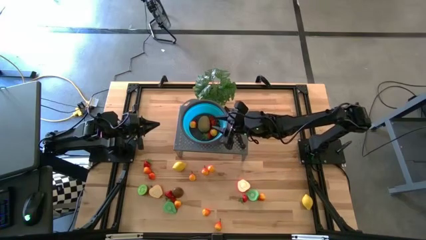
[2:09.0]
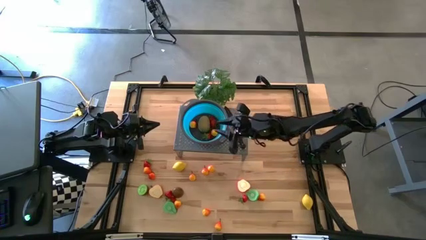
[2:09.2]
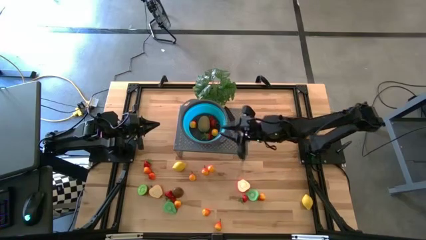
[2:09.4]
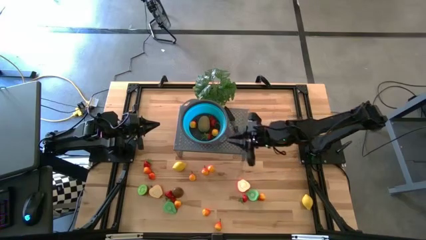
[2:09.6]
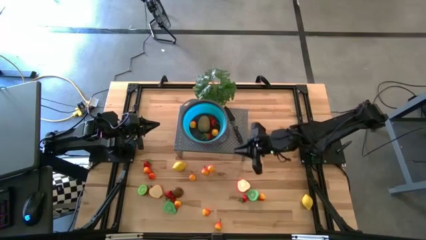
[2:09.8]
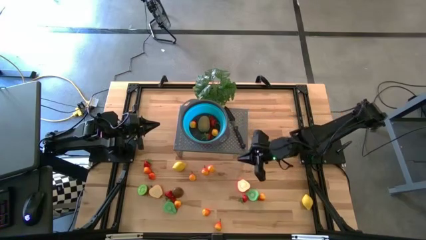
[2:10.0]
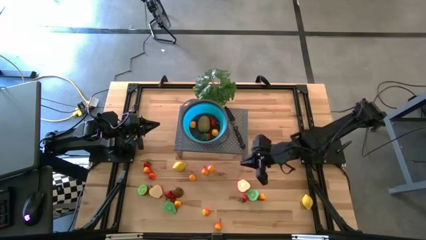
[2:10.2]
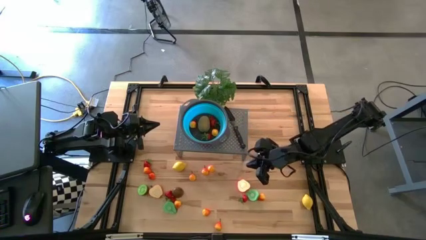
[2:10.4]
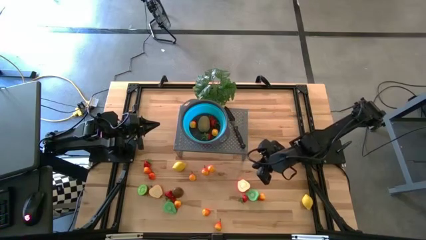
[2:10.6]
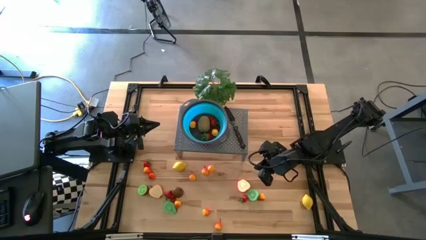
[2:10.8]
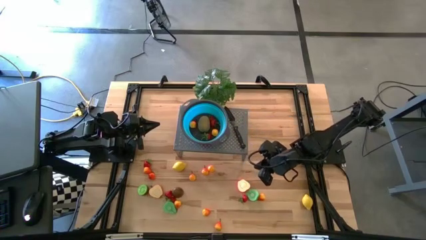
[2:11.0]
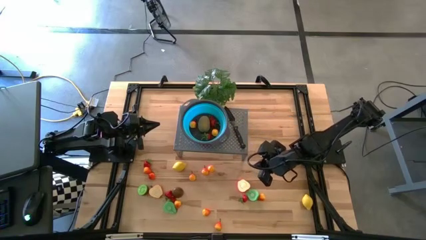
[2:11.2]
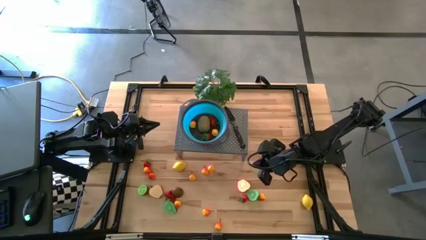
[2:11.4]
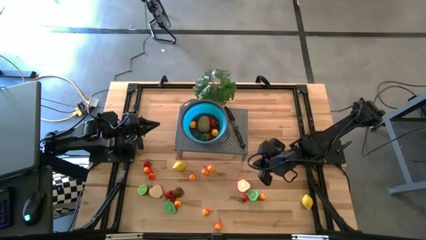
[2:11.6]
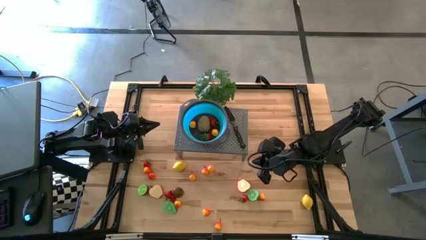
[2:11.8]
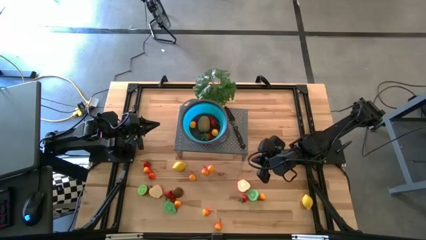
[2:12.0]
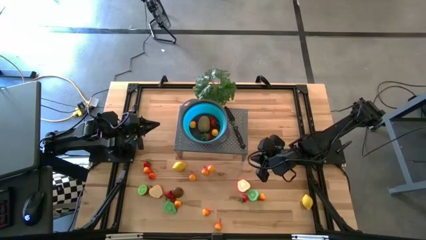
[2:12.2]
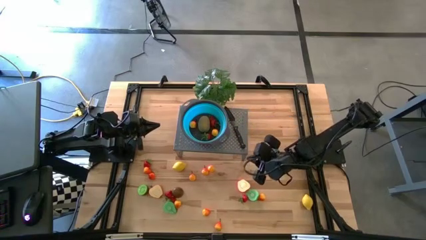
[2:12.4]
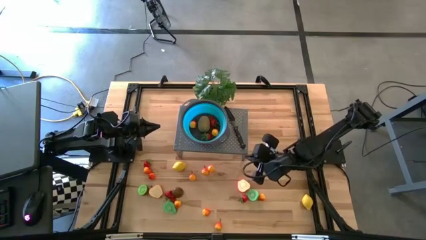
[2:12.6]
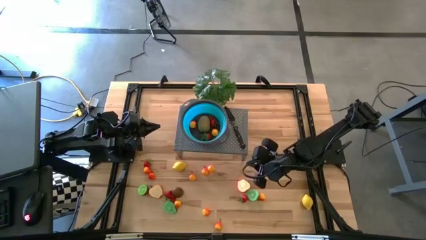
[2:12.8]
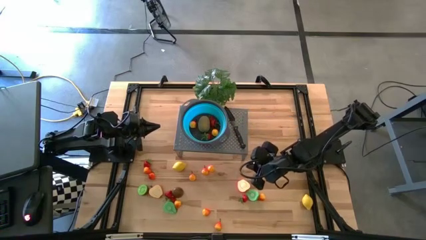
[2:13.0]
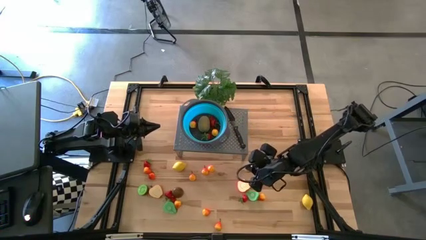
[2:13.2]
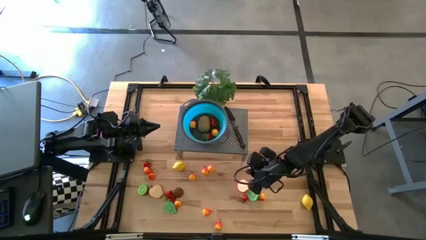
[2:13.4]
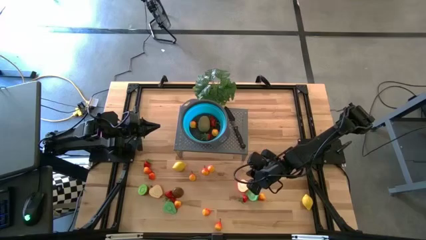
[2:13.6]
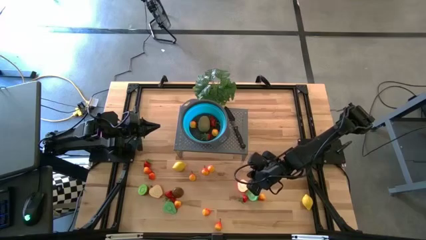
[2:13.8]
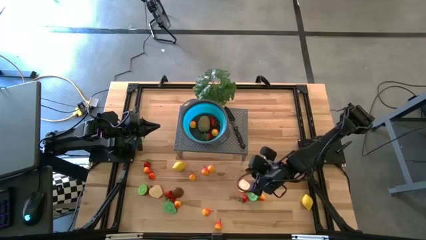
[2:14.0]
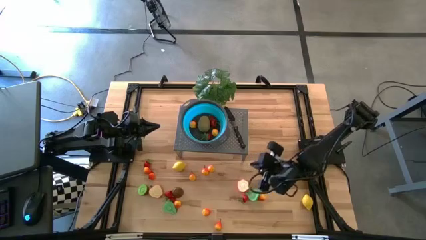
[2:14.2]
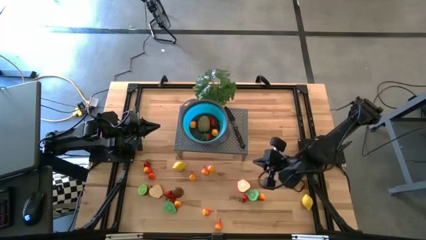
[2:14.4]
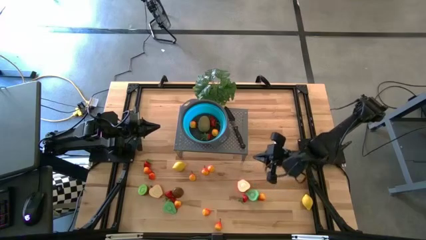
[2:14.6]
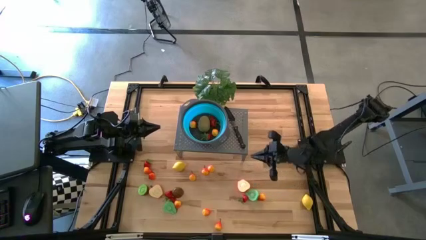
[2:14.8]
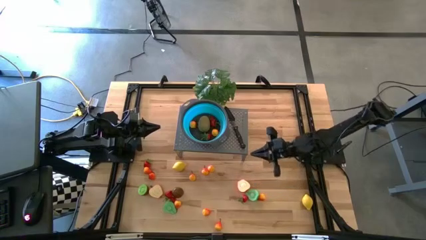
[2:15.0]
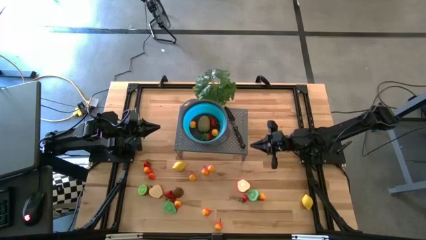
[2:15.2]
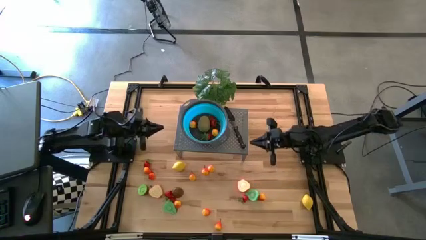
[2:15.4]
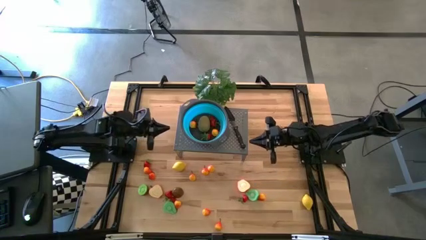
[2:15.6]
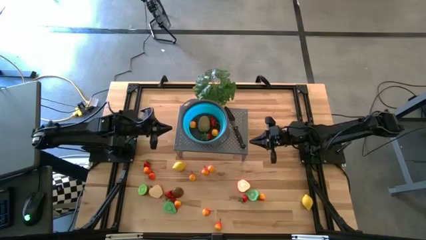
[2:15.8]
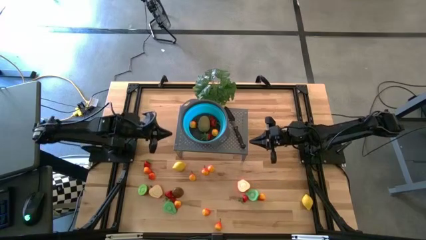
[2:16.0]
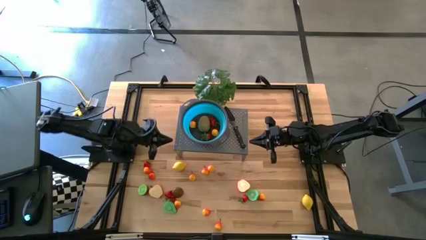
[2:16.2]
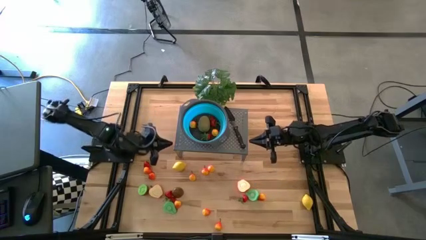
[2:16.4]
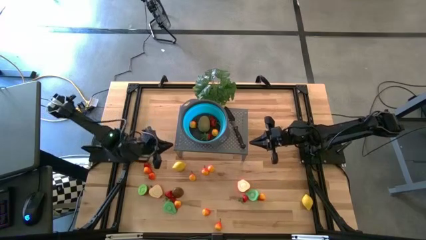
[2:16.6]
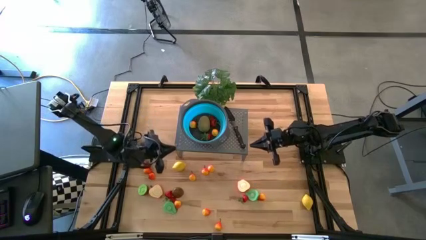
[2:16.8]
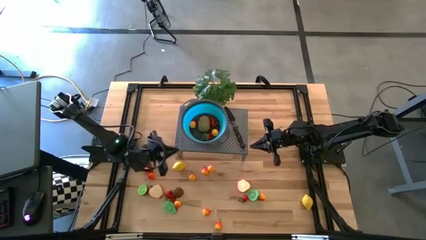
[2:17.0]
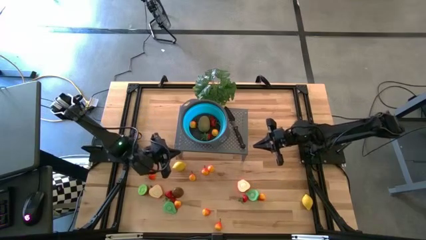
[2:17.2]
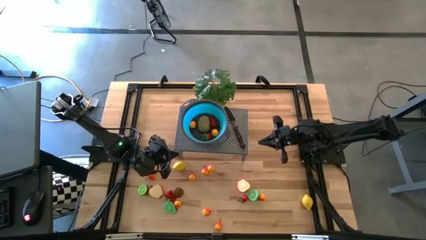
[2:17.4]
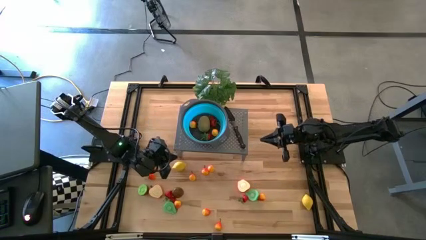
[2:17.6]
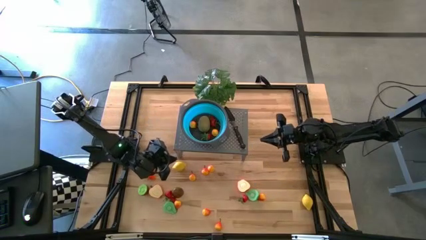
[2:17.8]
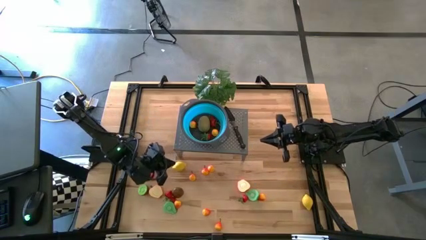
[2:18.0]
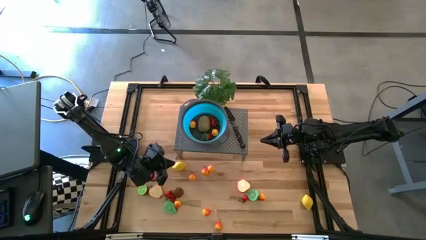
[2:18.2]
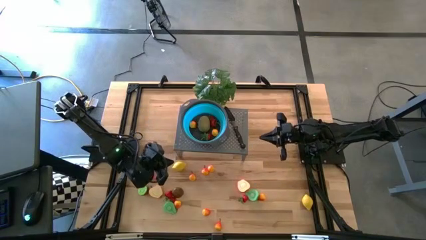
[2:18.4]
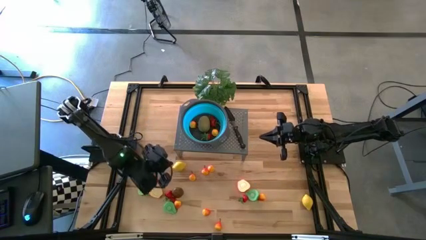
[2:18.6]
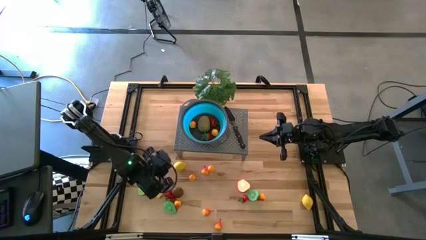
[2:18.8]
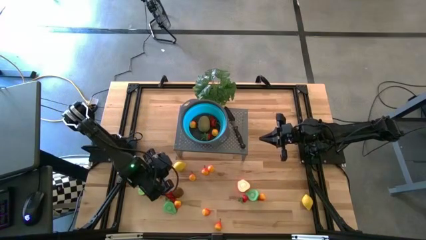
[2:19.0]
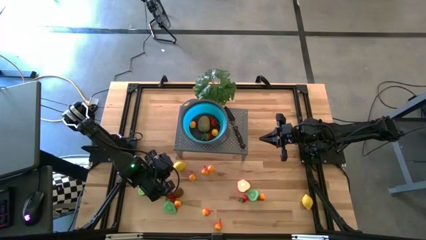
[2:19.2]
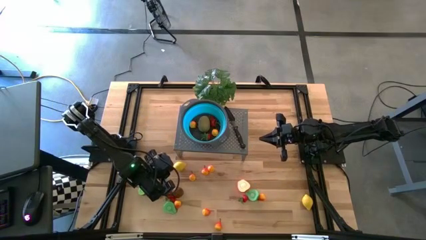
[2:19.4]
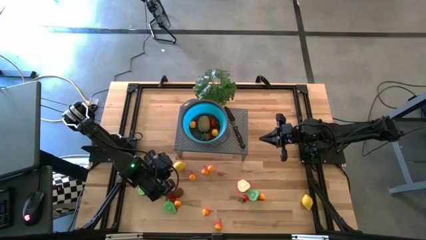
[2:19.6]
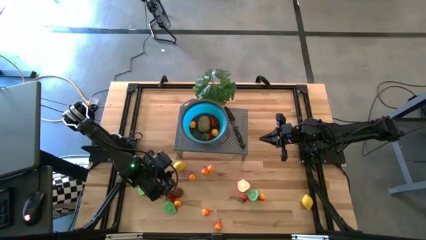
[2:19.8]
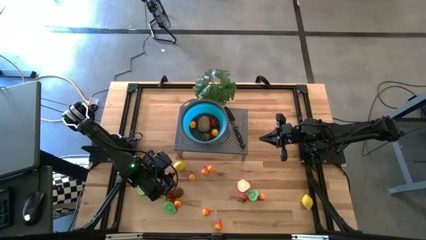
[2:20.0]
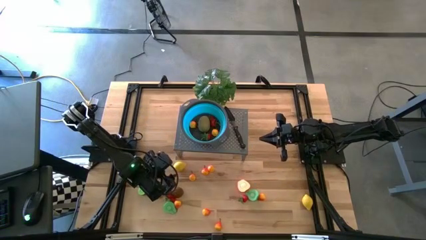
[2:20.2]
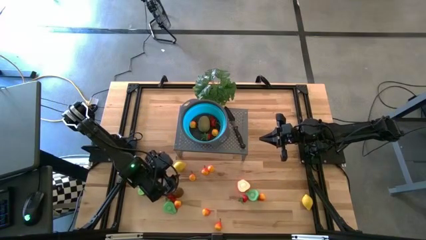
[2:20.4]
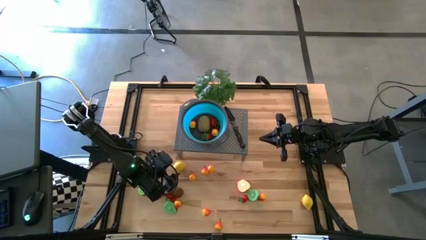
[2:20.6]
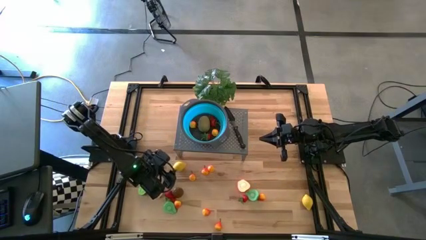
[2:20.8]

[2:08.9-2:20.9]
Task: Pick & Place Fruit
Put the lemon into the blue strainer bowl on the shelf
